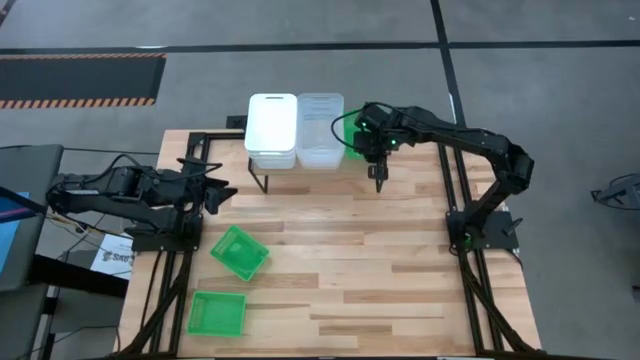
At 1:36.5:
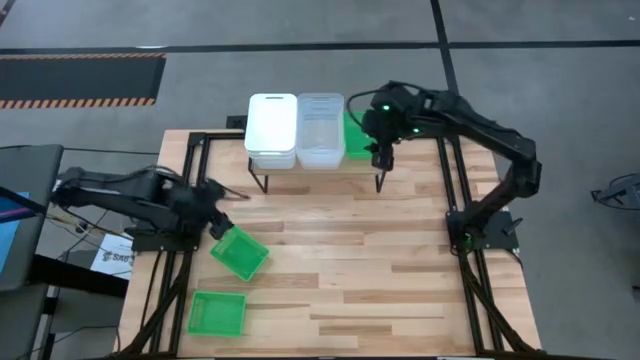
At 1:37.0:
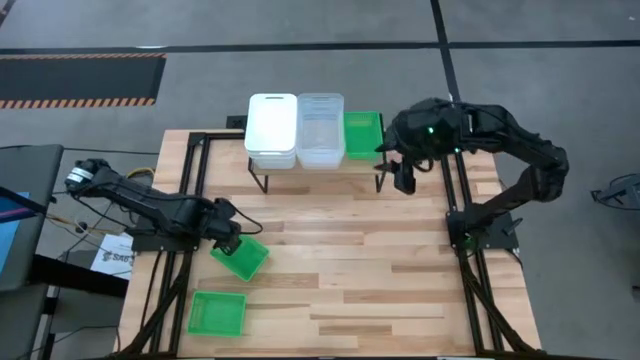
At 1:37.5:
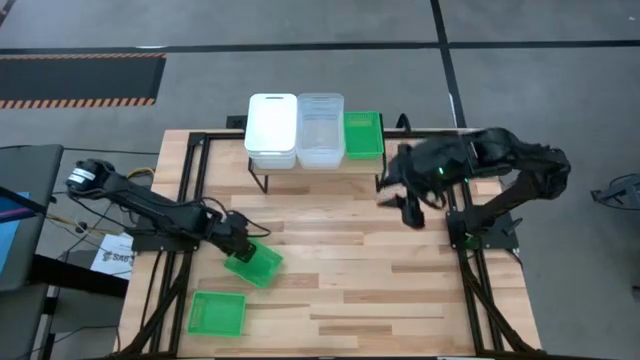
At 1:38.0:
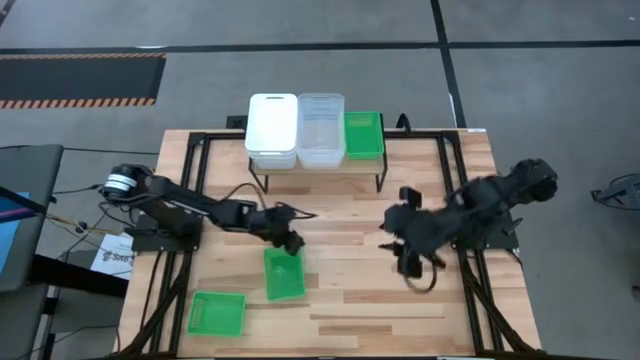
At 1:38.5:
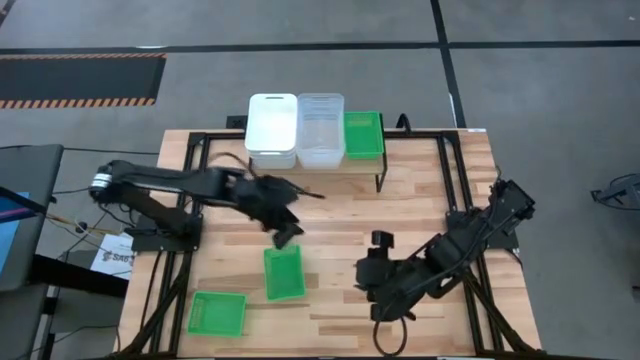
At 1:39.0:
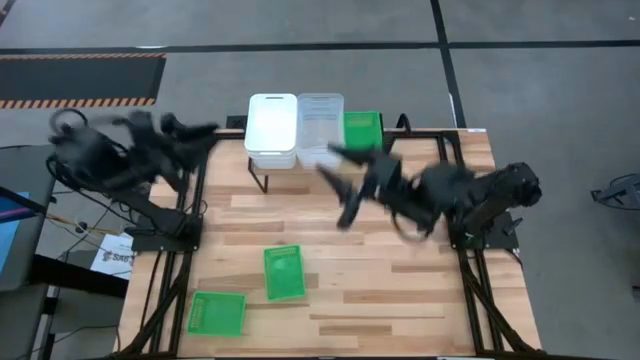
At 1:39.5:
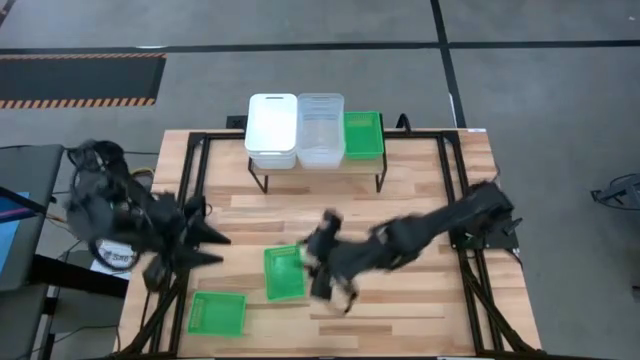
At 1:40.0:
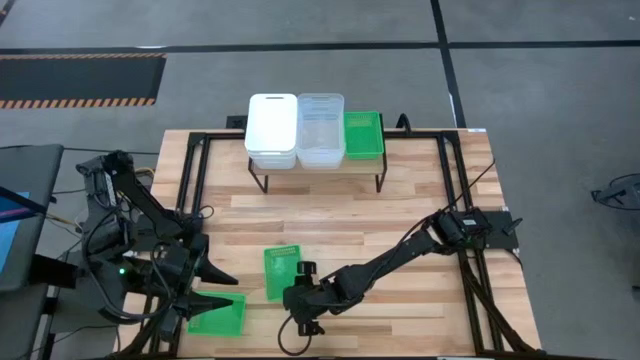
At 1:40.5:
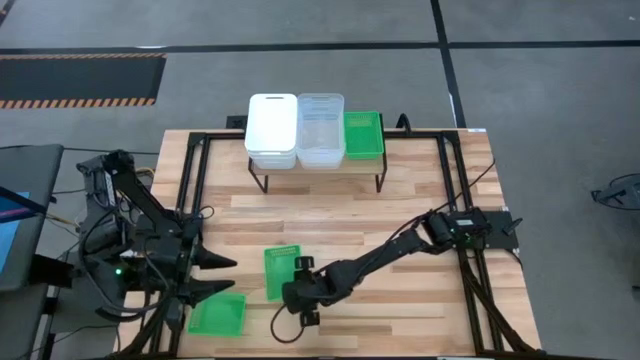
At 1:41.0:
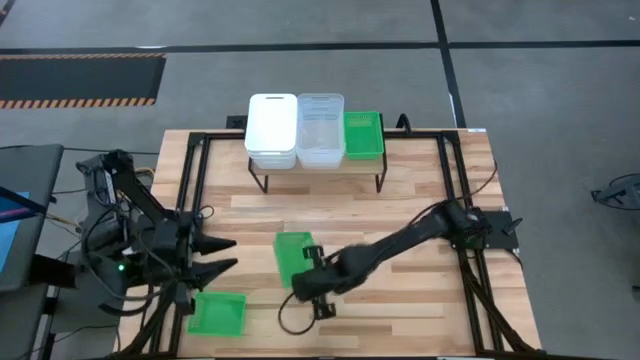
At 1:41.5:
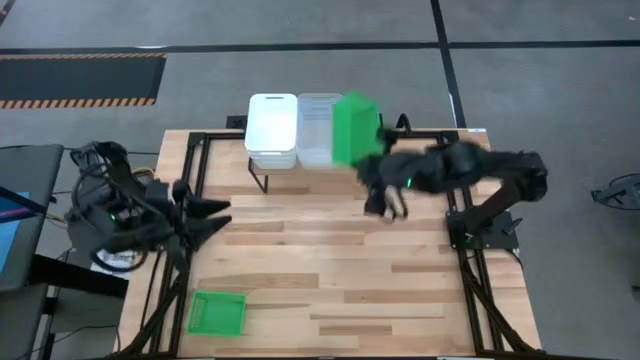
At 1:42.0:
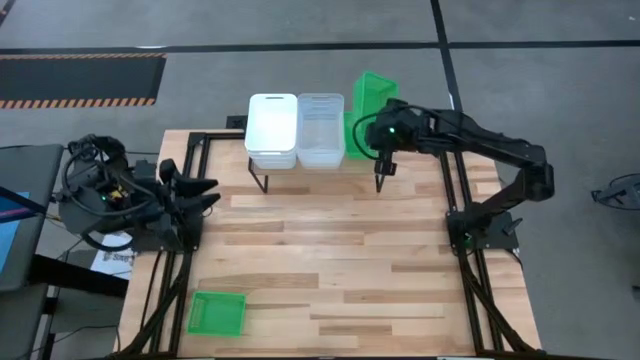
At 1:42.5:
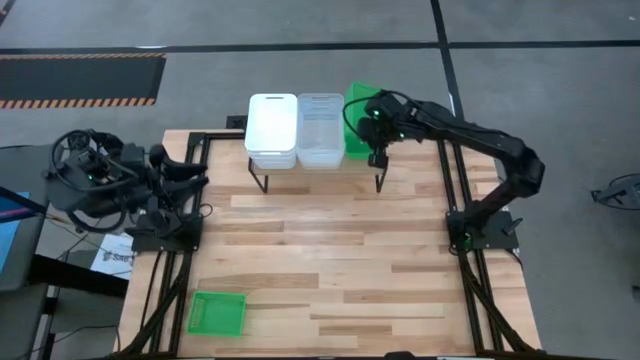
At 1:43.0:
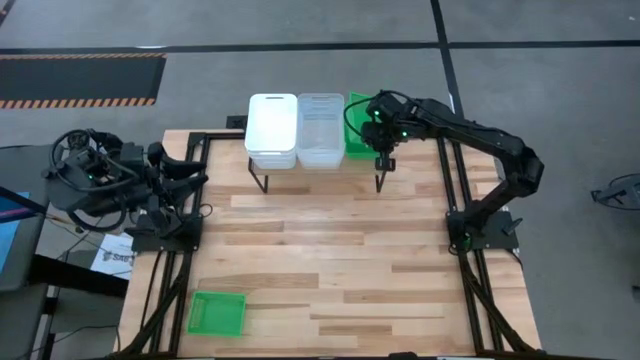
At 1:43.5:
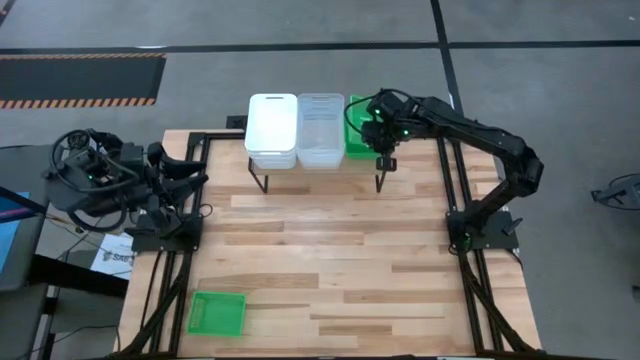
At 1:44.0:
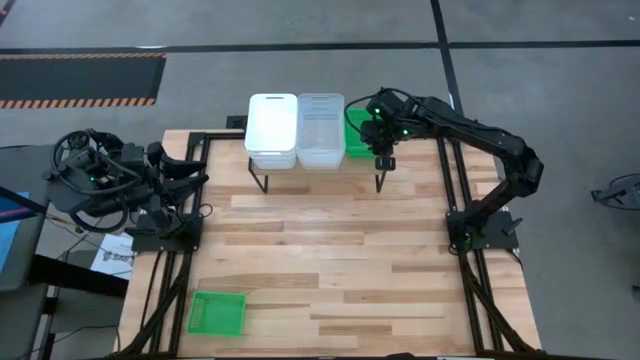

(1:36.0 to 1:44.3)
Task: Stack baskets on shelf by color
Stack the top green bin on the green bin on the shelf

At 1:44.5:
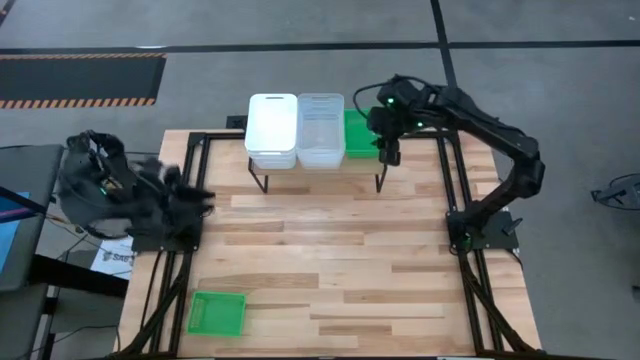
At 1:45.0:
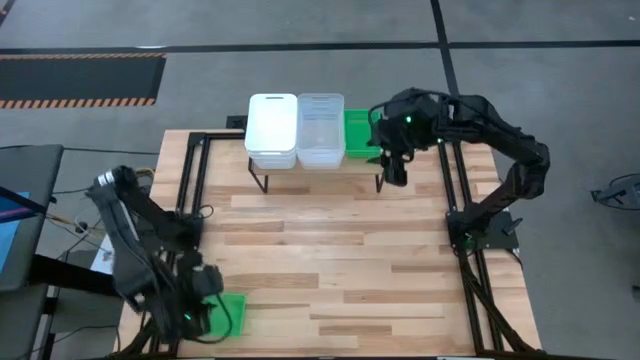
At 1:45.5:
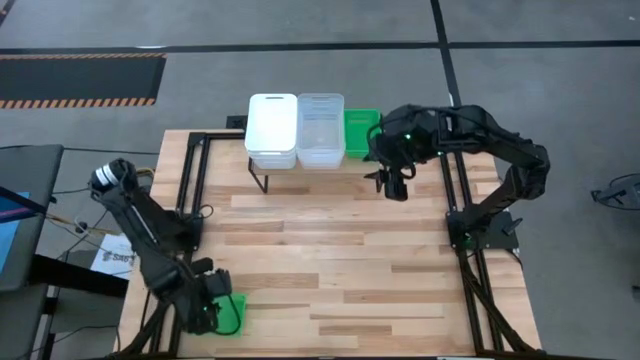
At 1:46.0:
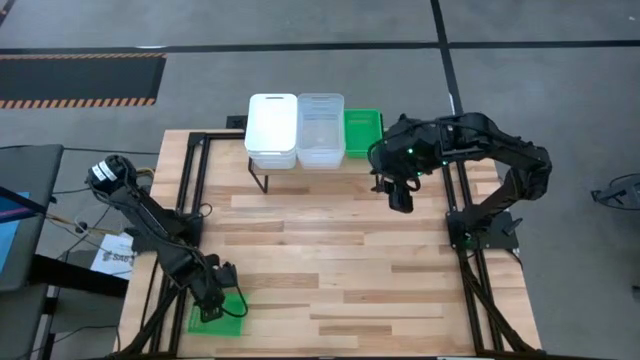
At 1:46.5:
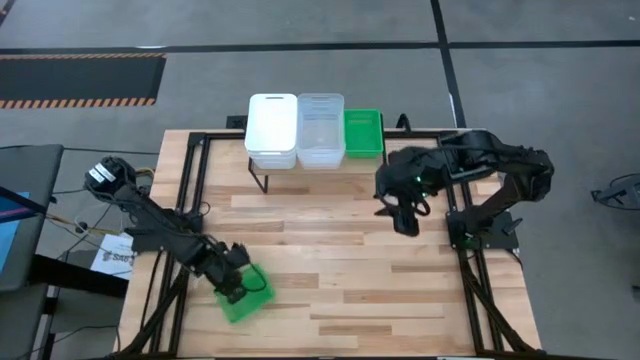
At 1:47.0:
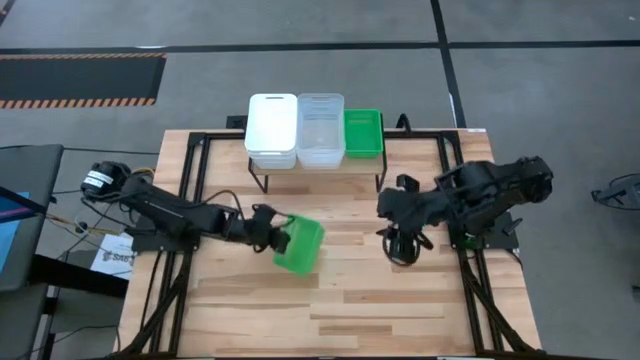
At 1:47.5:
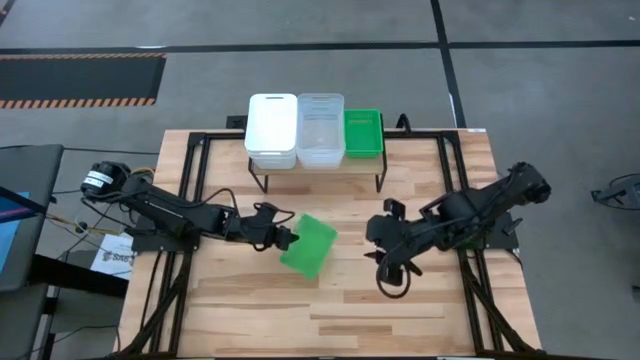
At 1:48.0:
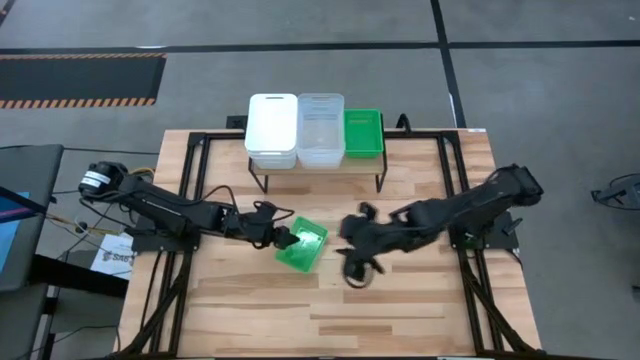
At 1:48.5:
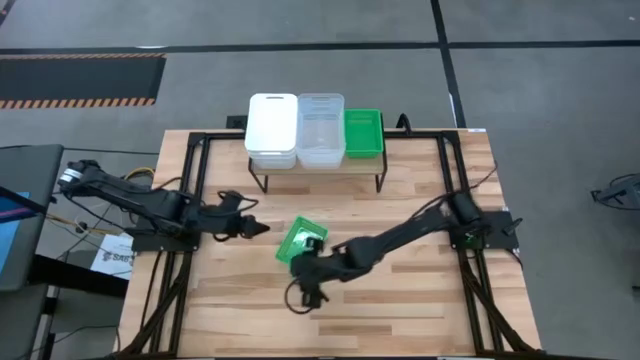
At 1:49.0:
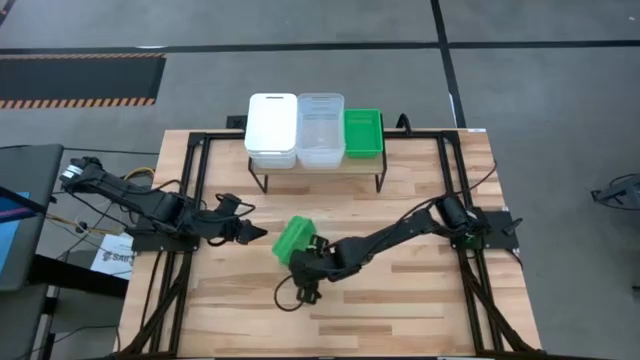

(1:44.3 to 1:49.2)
Stack the green bin on the green bin

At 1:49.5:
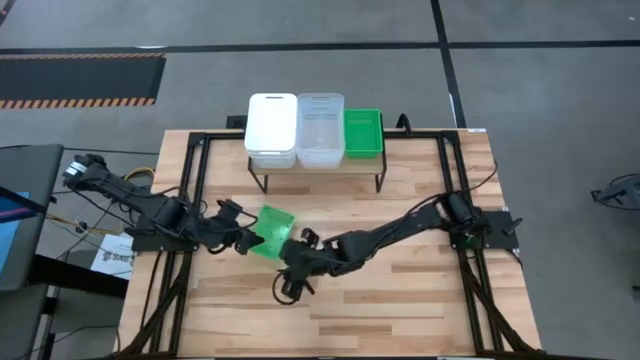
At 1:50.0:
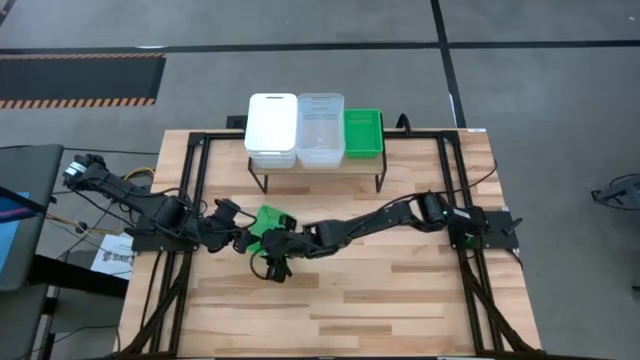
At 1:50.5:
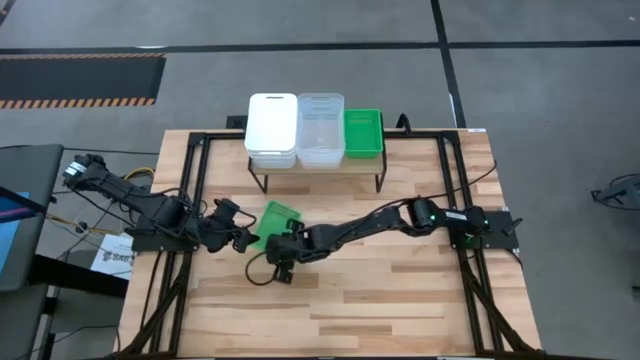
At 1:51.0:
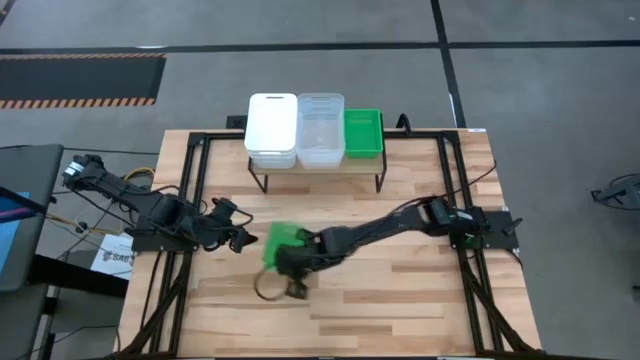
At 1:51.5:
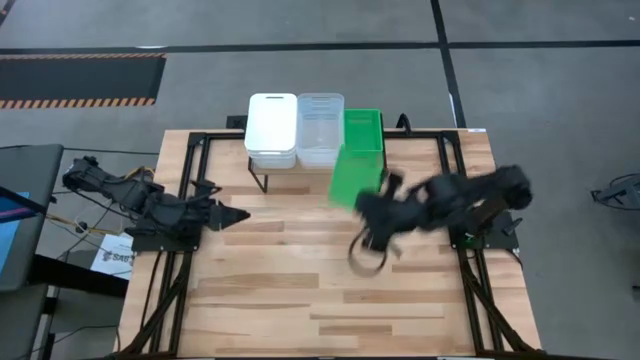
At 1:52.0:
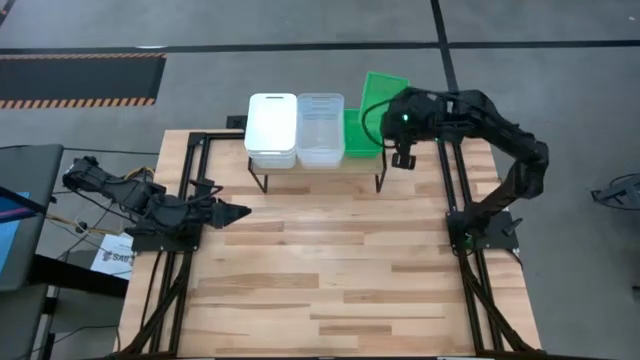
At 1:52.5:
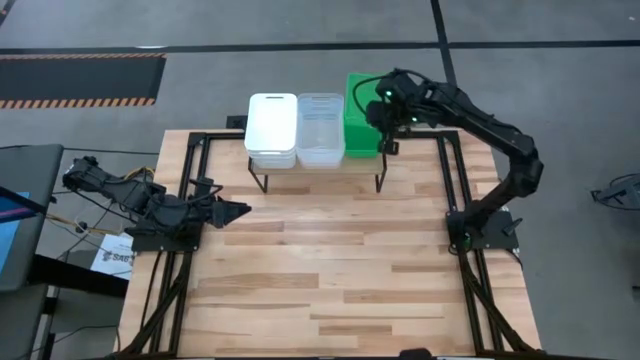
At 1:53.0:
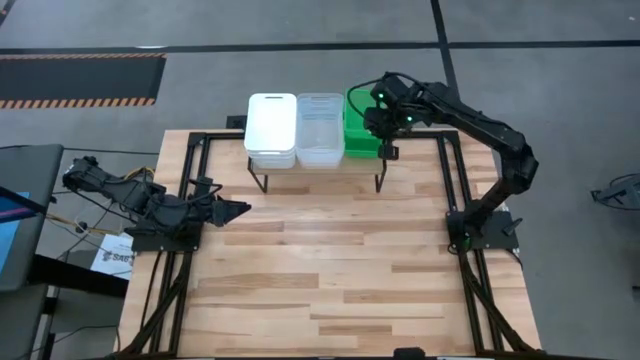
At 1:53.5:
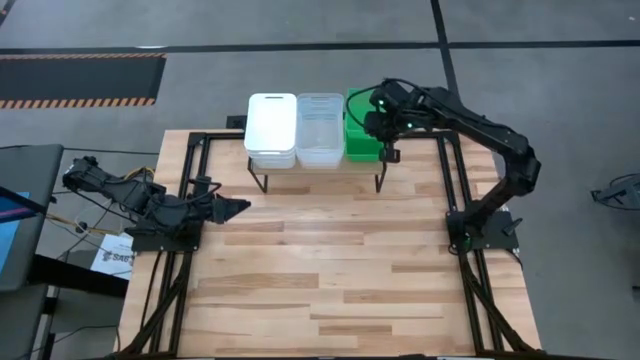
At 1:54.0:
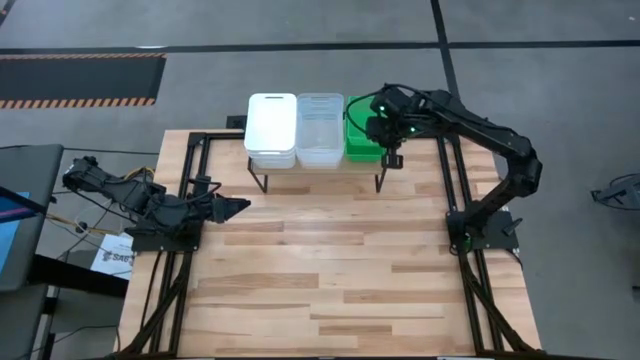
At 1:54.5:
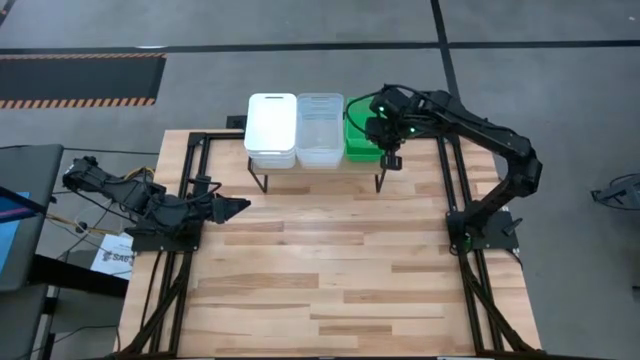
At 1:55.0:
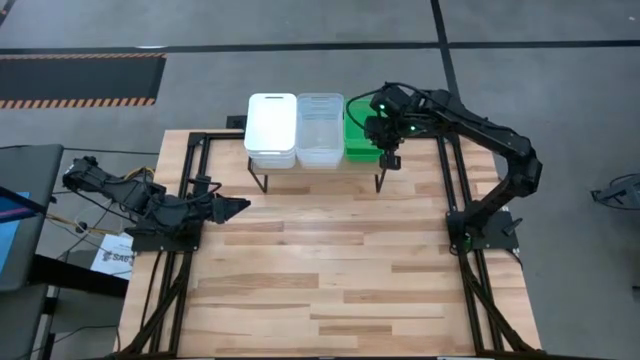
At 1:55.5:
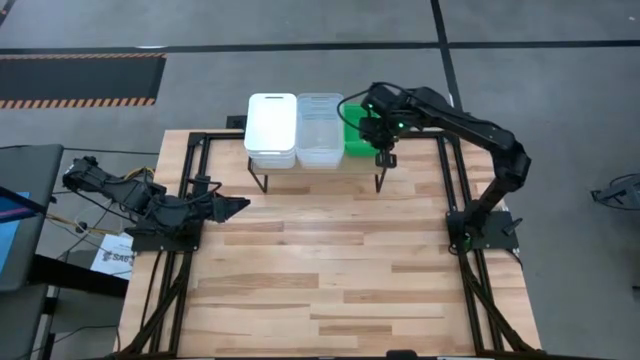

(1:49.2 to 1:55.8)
Stack the green bin on the green bin

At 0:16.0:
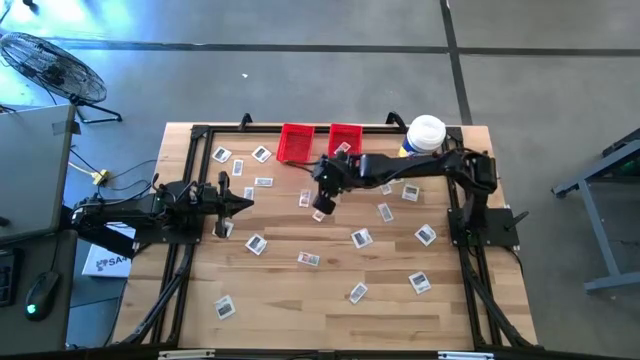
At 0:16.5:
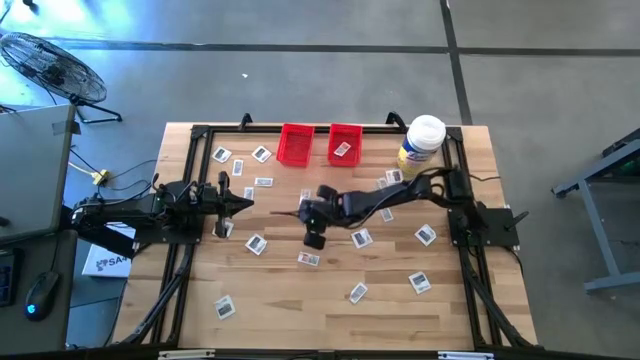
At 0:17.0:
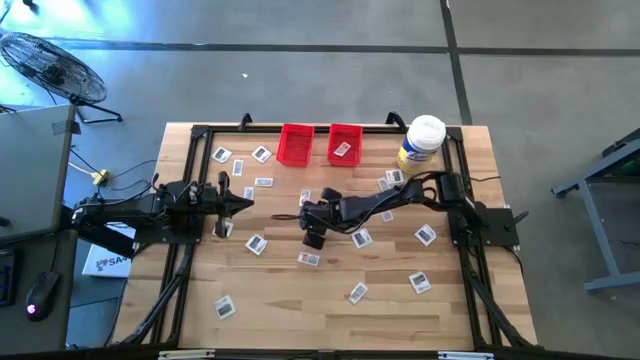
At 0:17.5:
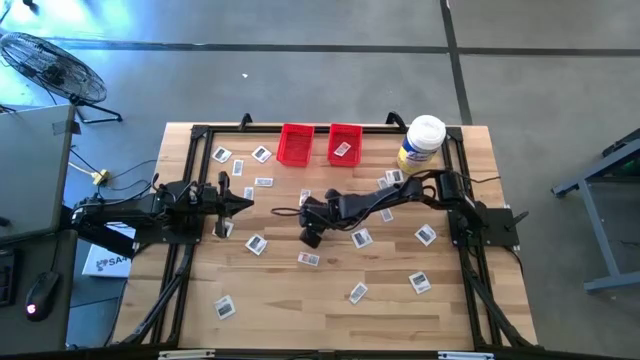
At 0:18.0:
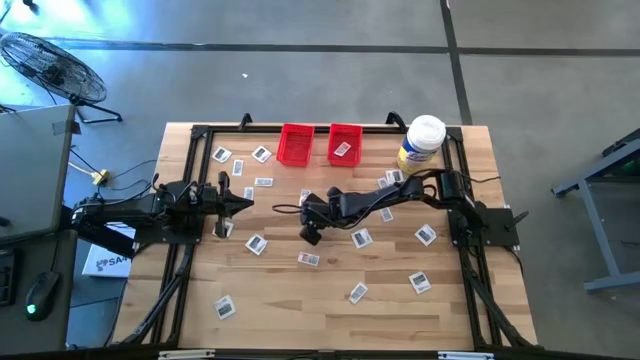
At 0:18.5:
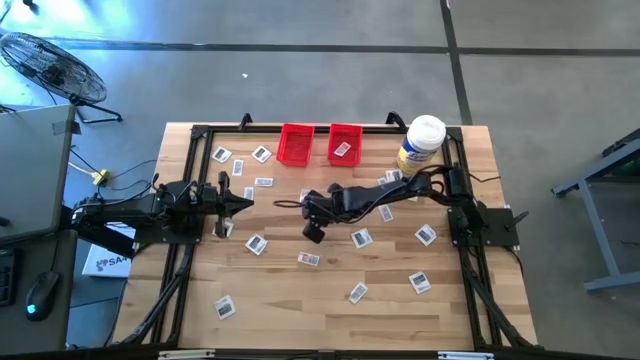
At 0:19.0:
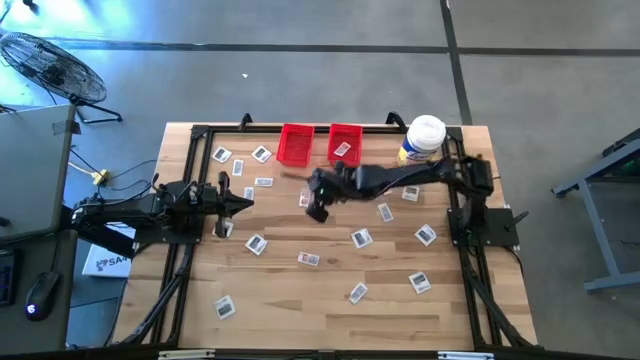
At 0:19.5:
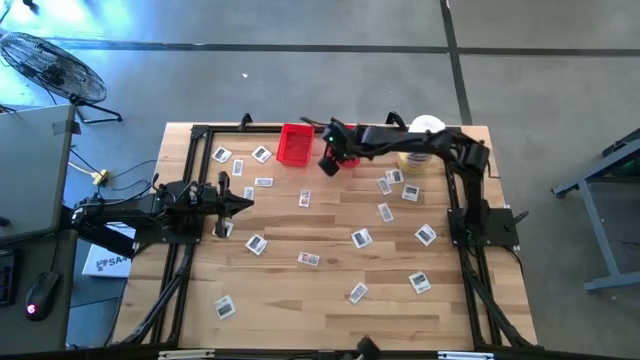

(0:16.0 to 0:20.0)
Task: Pick & Place First Aid Supplies
Put the ointment pack into the right red bin
